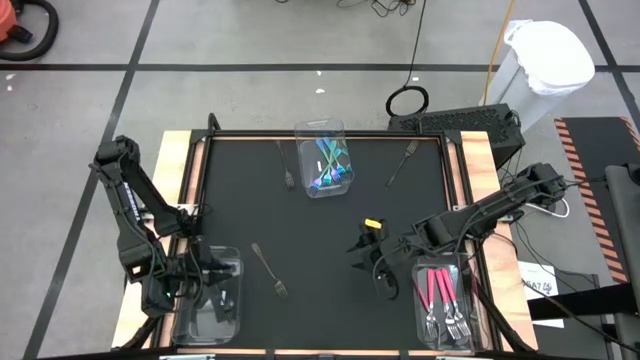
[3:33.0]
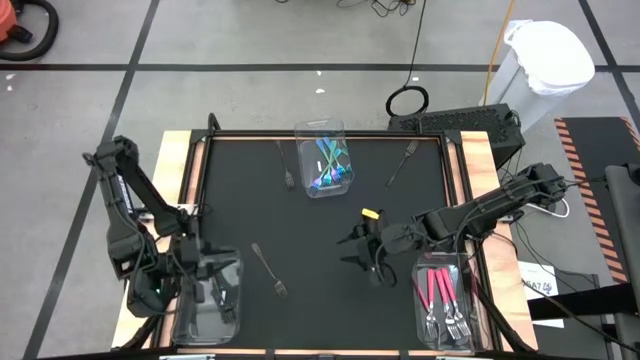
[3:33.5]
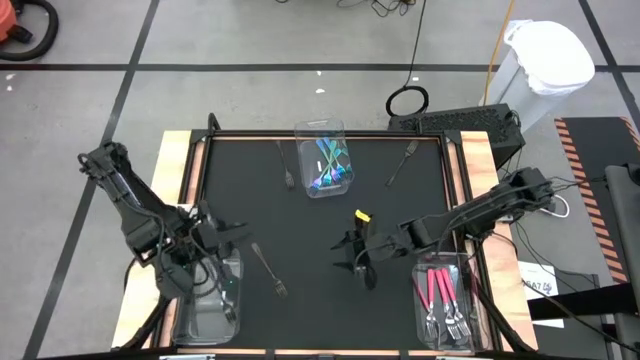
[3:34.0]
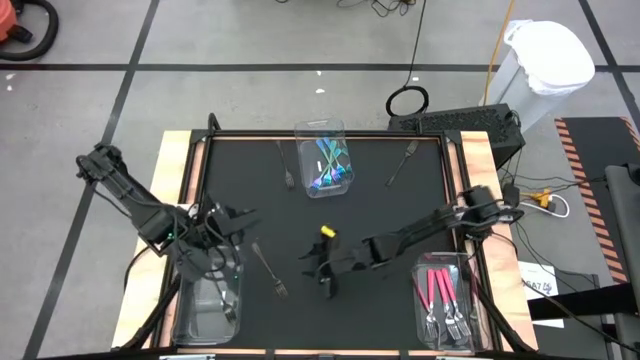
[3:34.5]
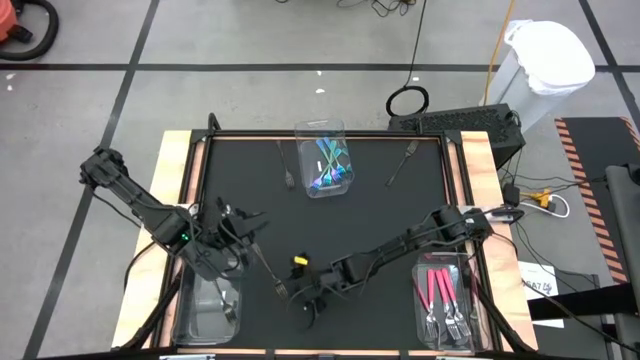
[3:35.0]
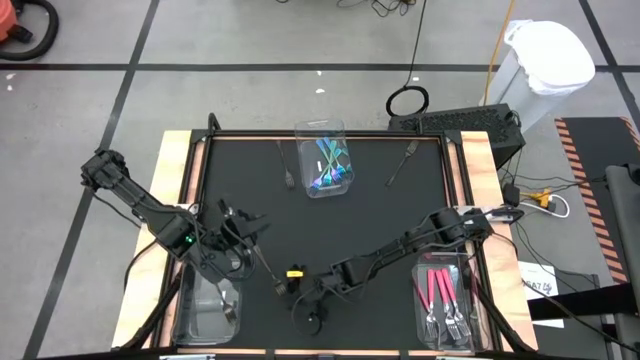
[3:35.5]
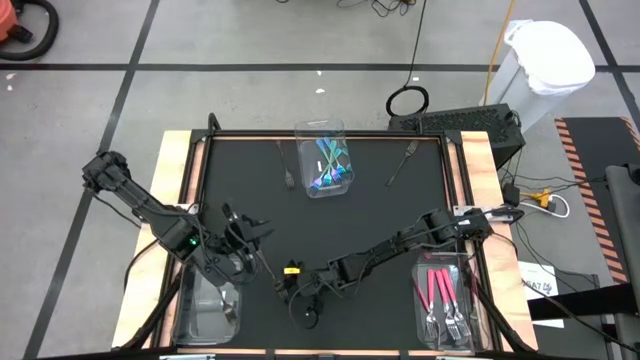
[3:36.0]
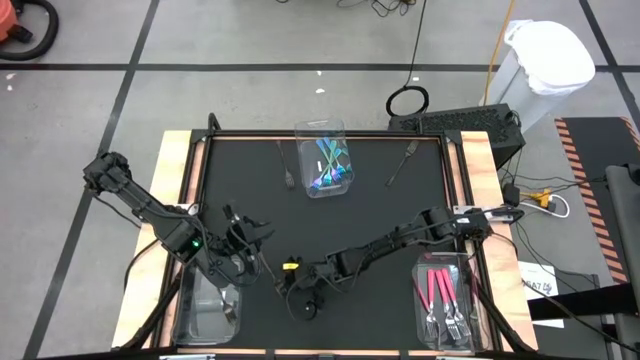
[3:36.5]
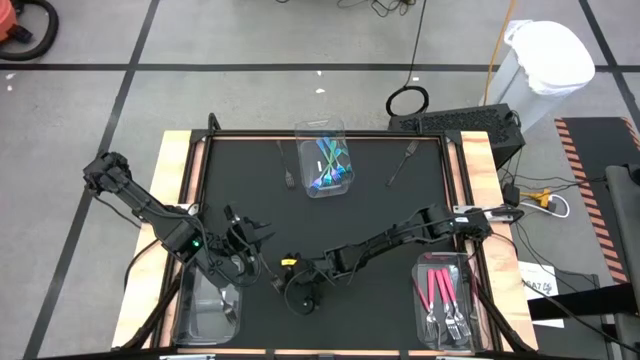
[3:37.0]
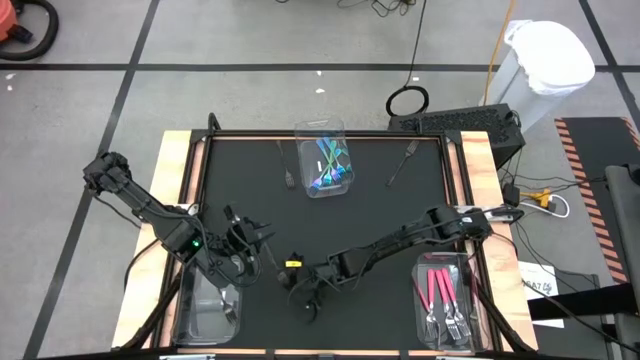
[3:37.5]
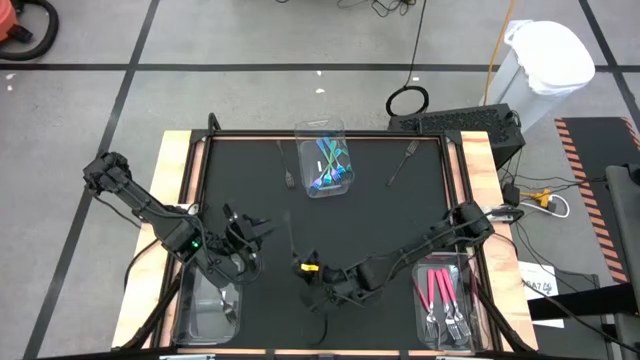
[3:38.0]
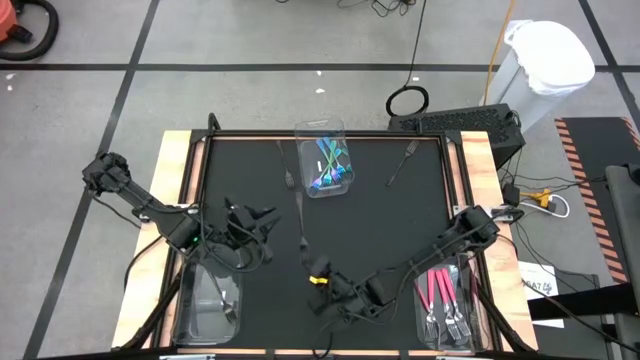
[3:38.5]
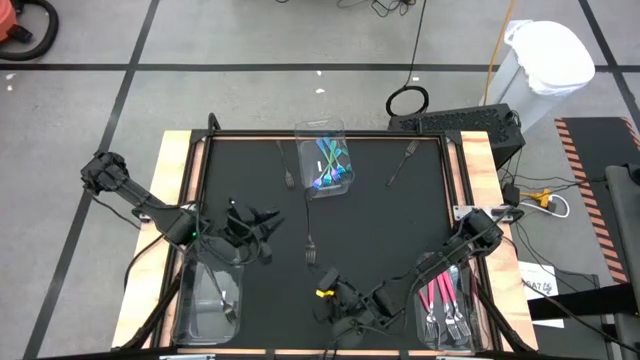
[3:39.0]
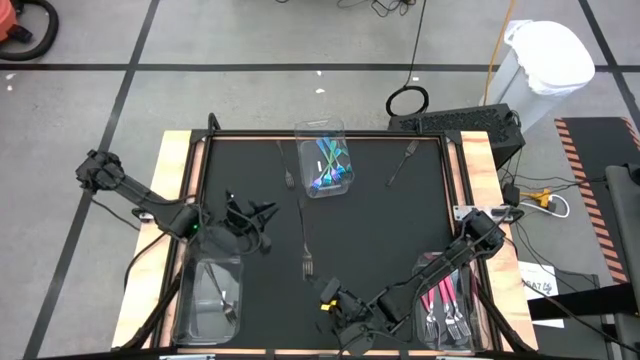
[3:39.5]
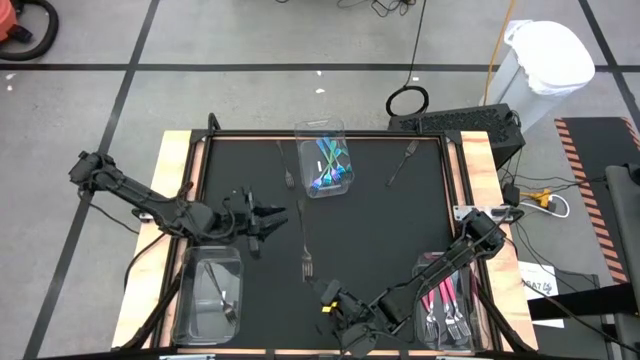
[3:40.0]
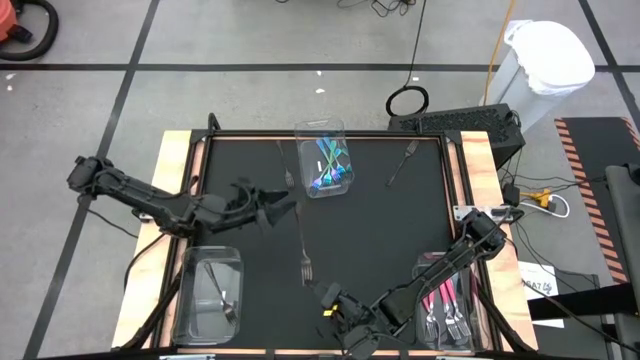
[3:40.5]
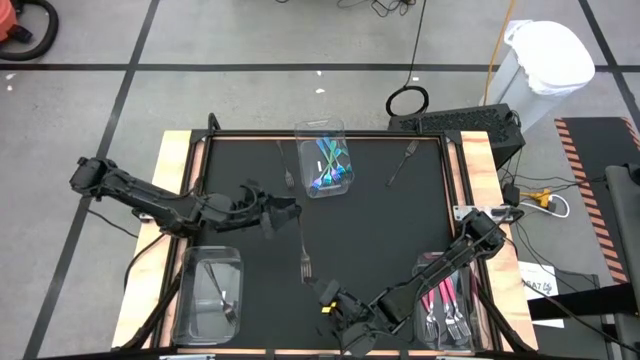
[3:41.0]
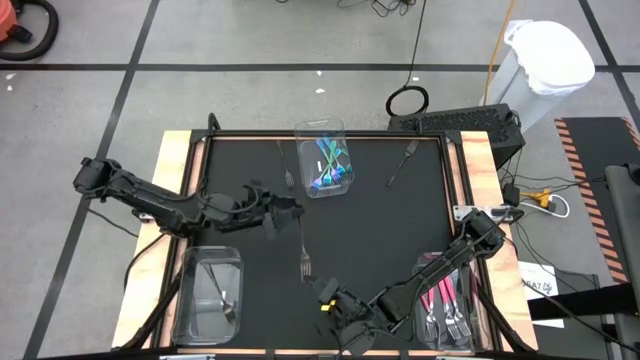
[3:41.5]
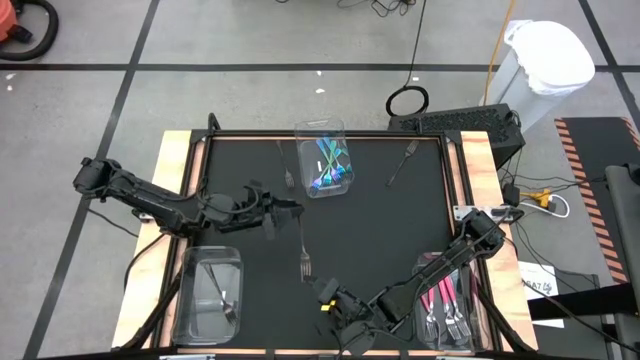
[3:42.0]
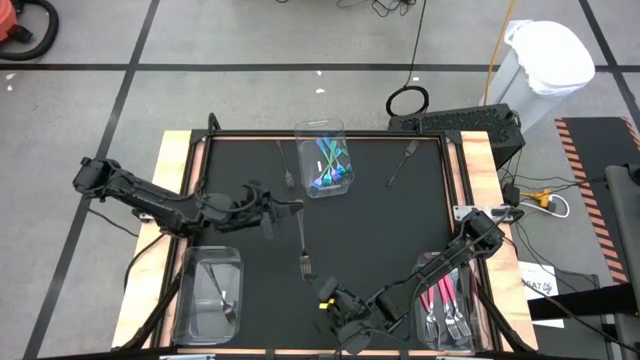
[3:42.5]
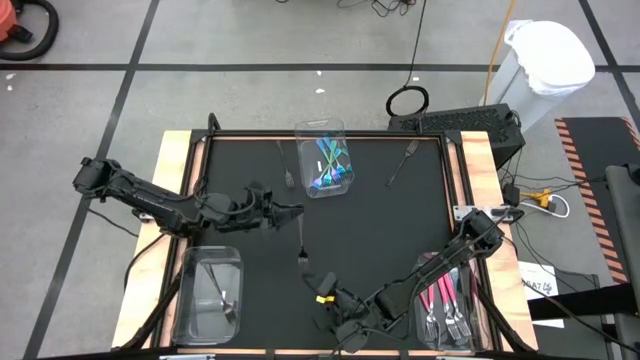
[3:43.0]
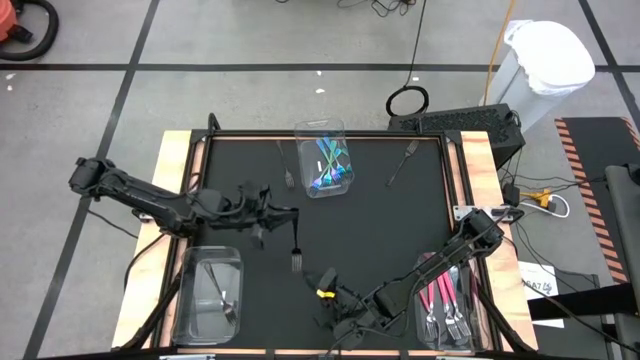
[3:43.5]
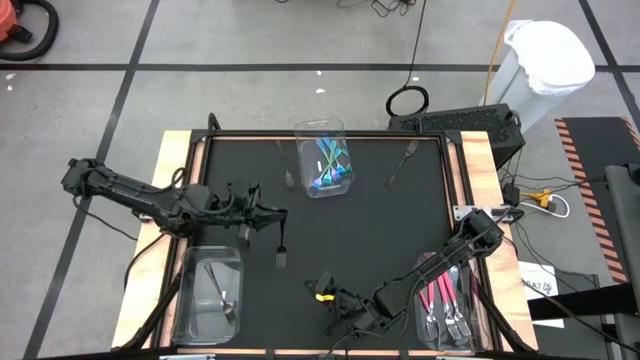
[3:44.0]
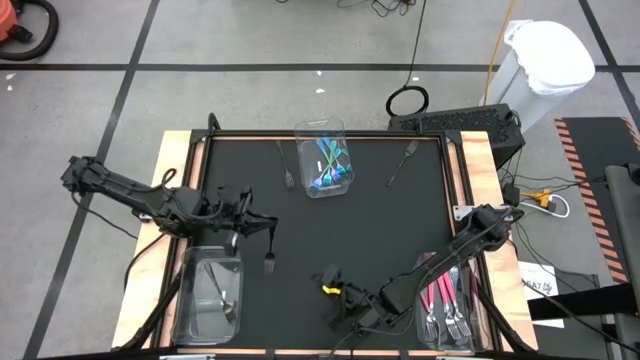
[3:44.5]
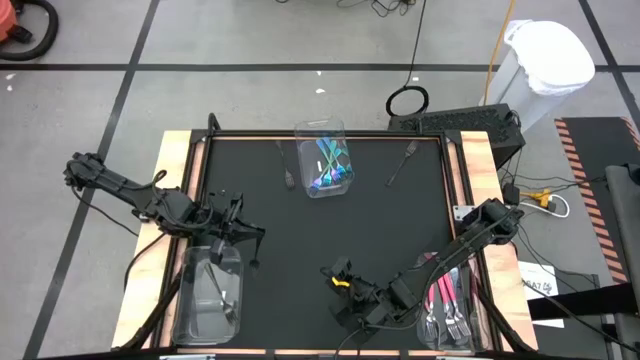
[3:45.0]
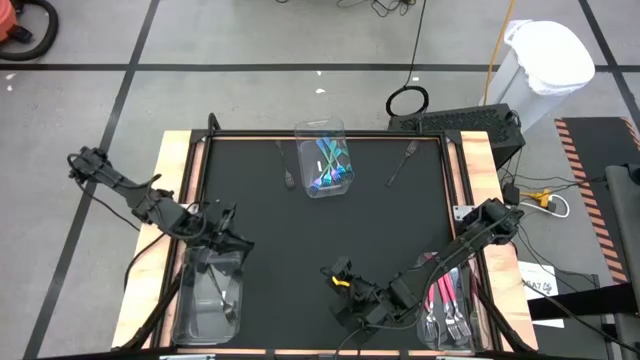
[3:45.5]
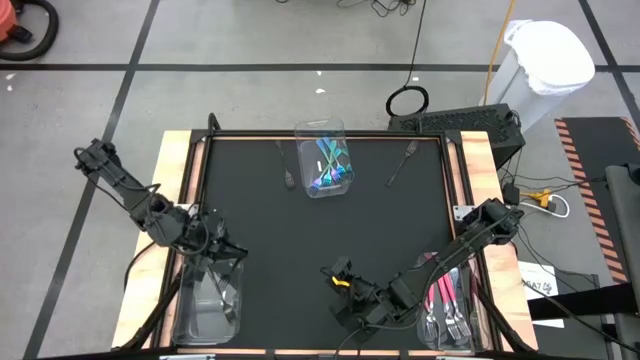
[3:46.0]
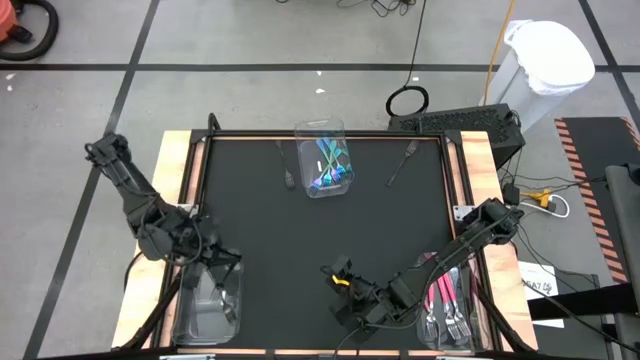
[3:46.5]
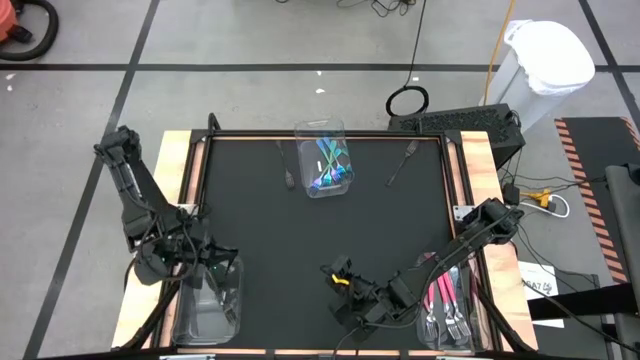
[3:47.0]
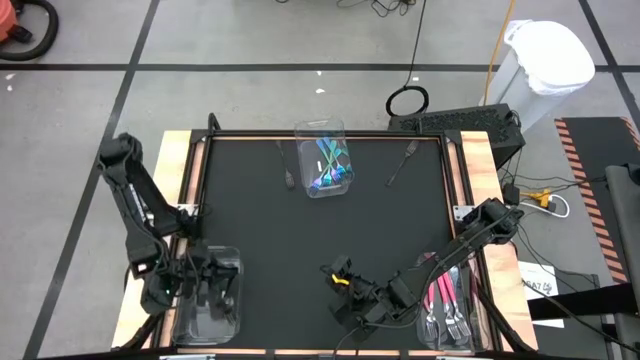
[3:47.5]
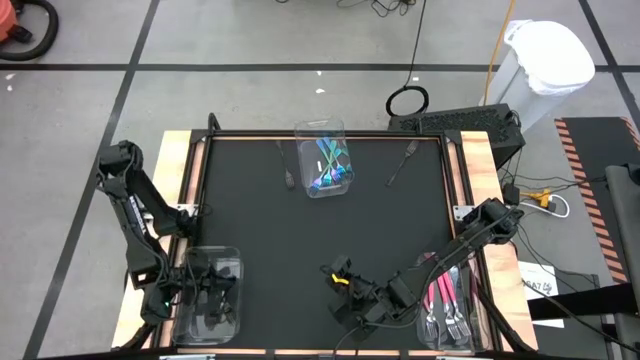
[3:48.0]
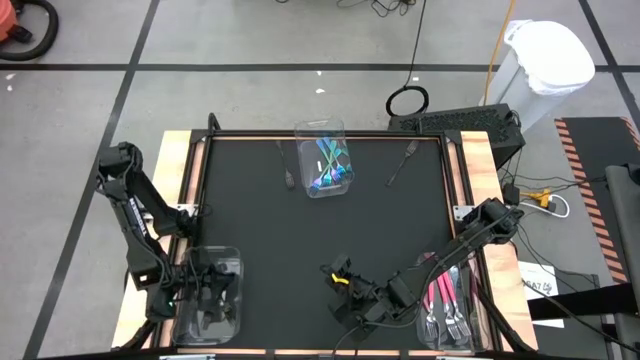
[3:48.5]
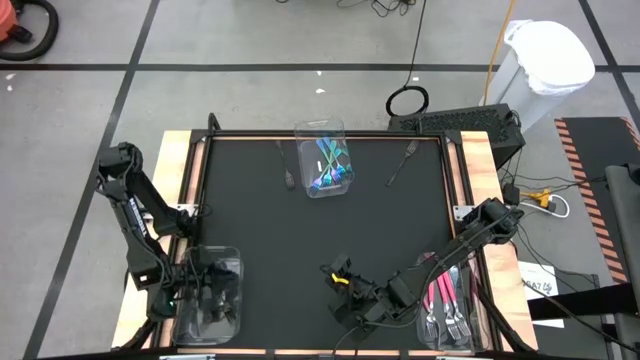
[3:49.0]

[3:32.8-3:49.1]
Task: Sort silverware by color (type)
Put the black fork into the bottom left transparent bin

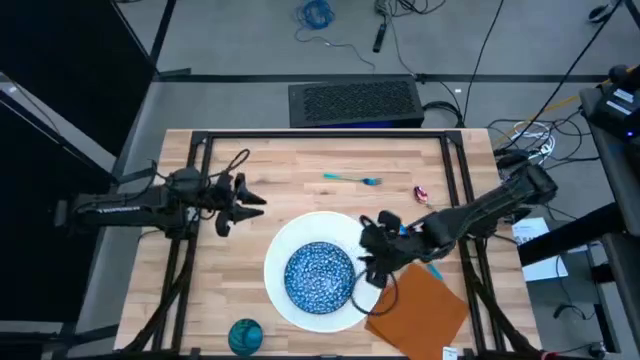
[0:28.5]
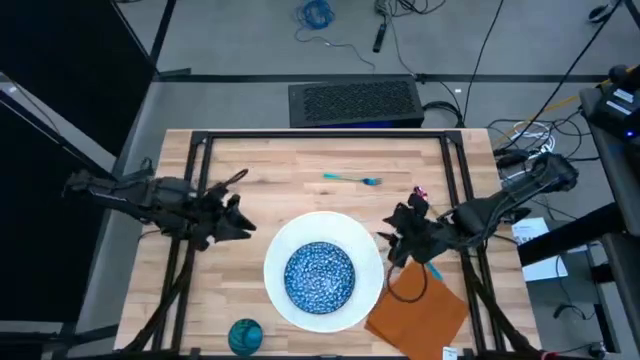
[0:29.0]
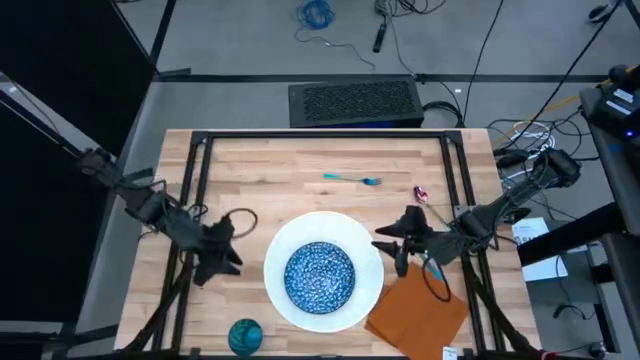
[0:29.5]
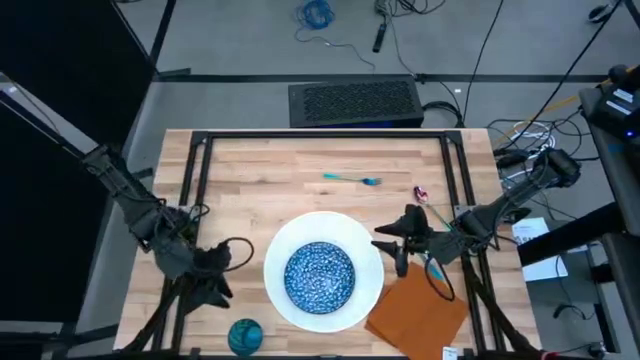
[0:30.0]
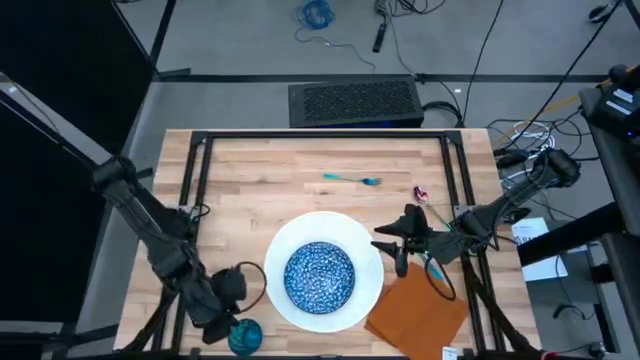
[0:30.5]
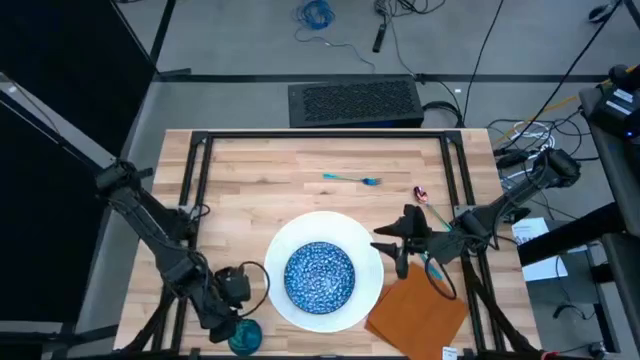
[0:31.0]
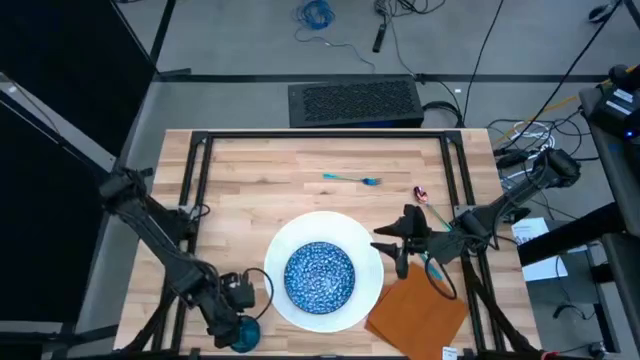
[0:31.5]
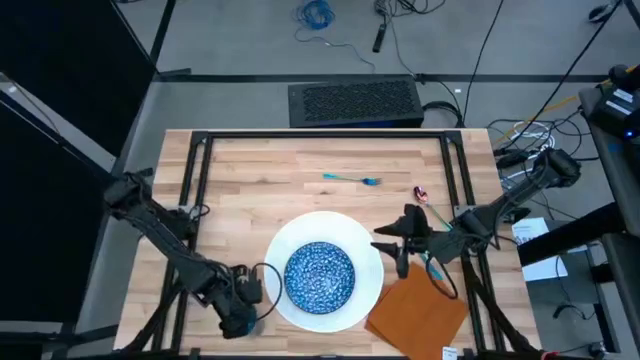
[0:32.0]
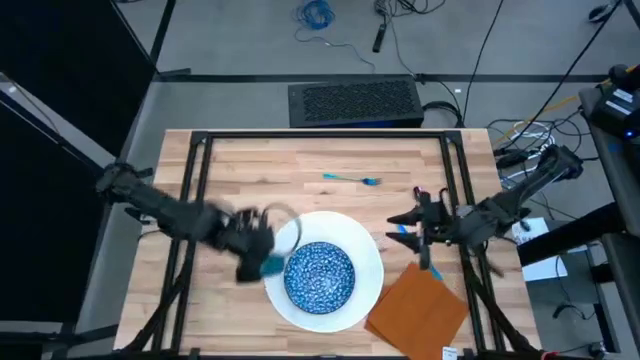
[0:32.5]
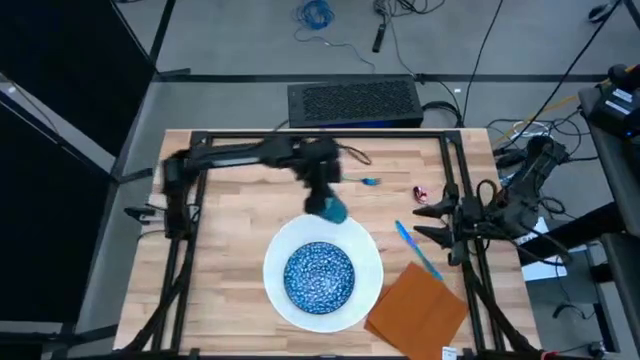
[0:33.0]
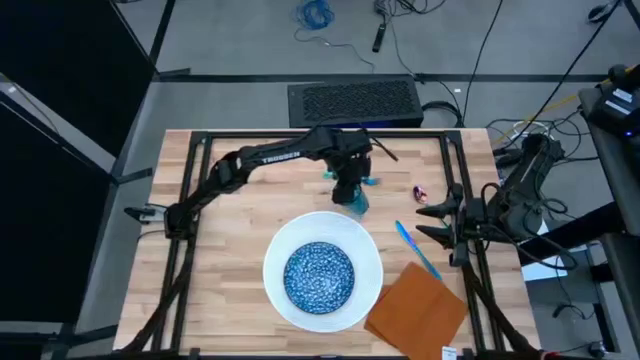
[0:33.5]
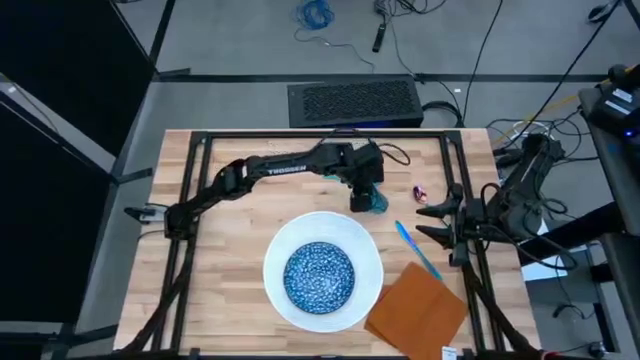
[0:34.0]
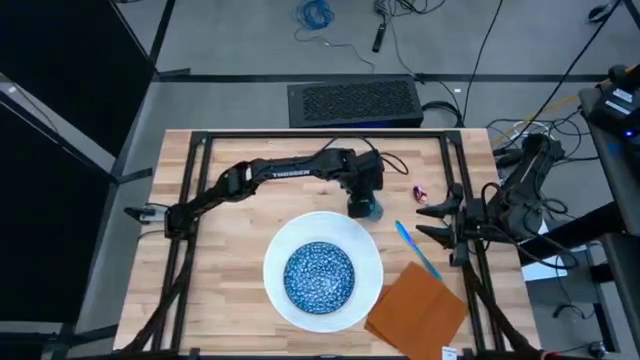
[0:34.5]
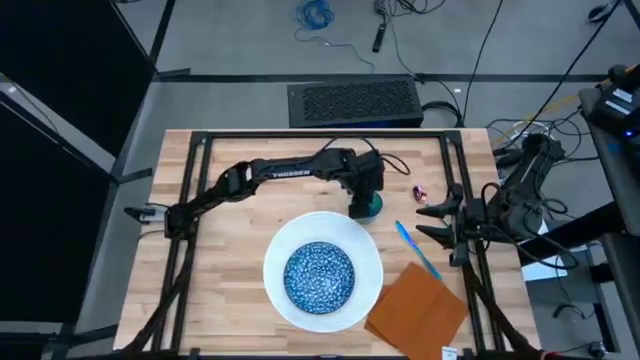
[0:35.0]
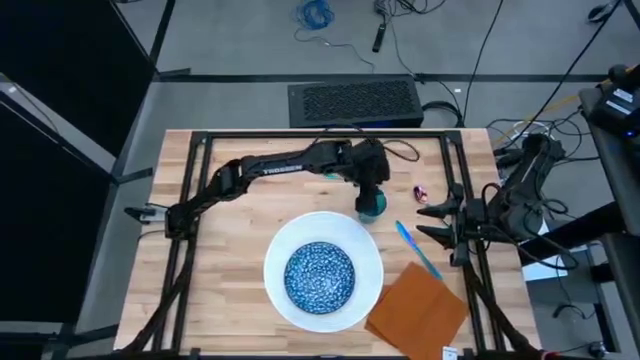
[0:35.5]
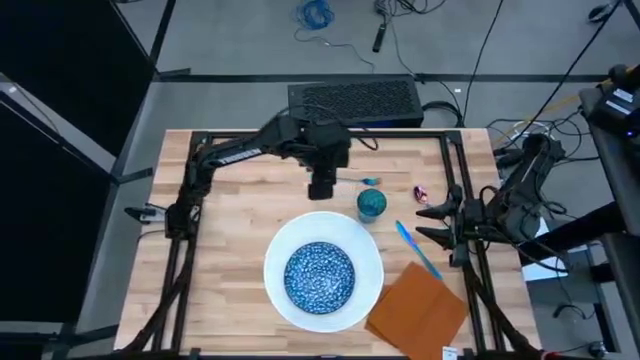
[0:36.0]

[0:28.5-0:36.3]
Task: Set table place
Move the blue glass to the top right of the white tablemat
